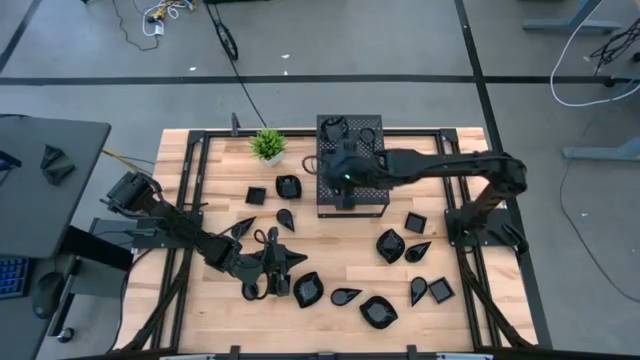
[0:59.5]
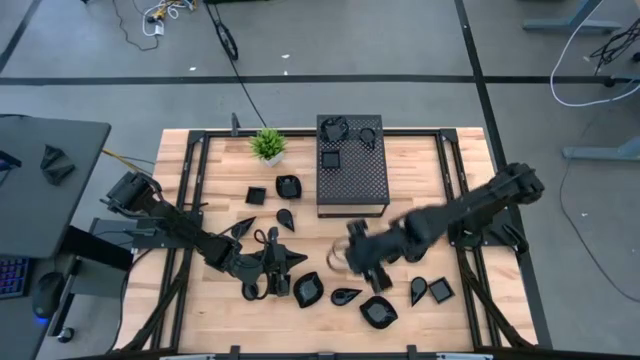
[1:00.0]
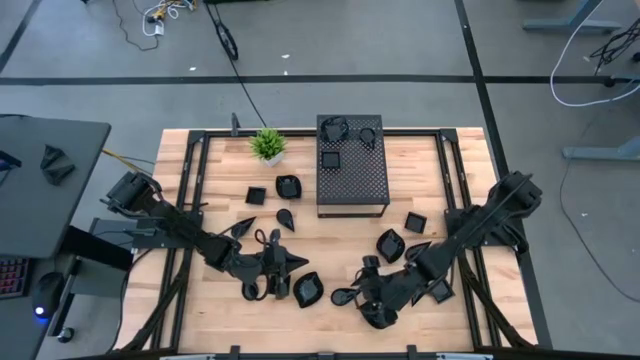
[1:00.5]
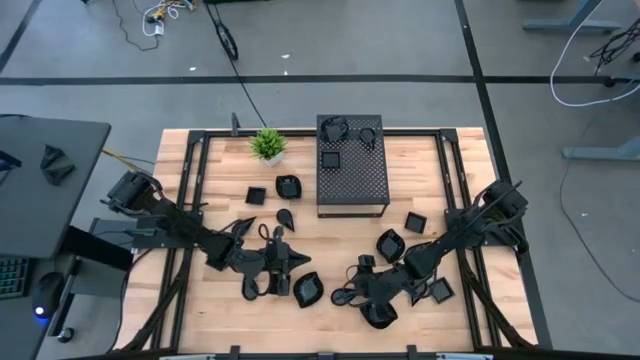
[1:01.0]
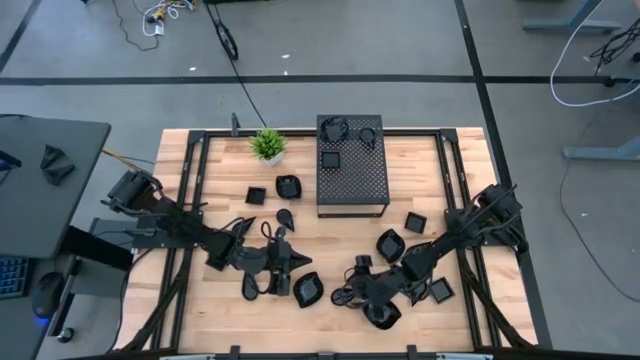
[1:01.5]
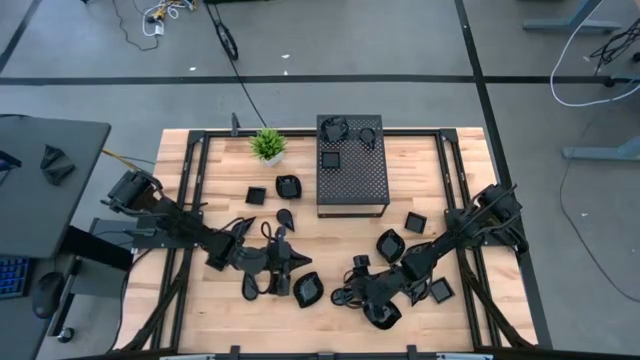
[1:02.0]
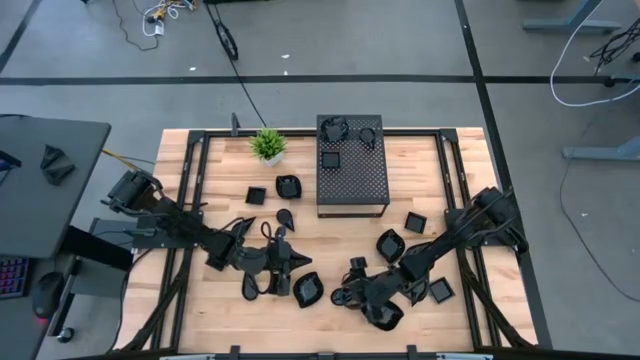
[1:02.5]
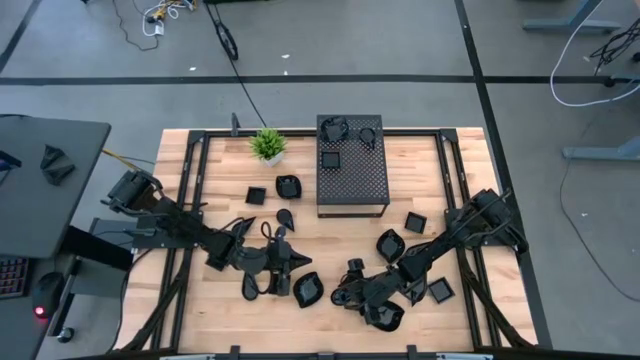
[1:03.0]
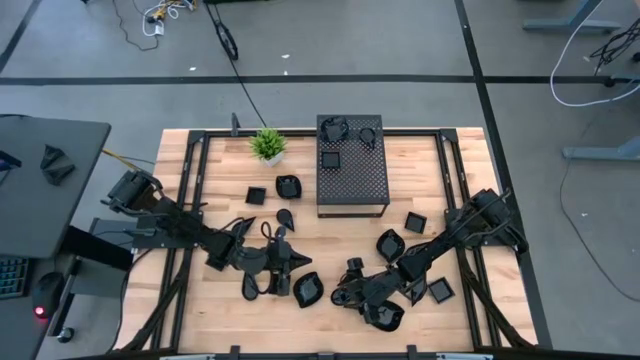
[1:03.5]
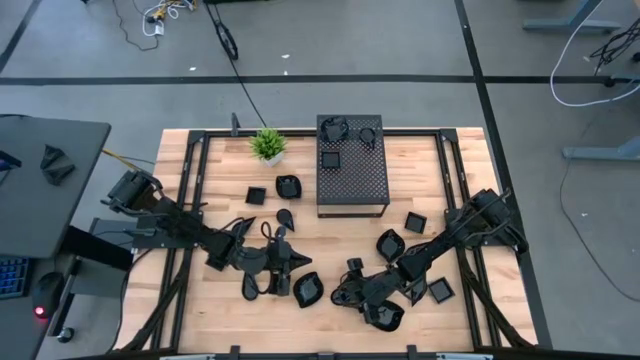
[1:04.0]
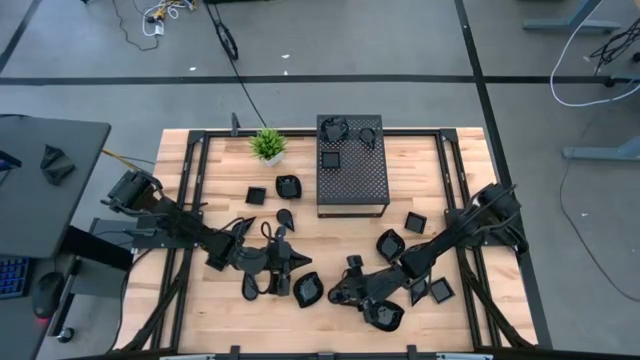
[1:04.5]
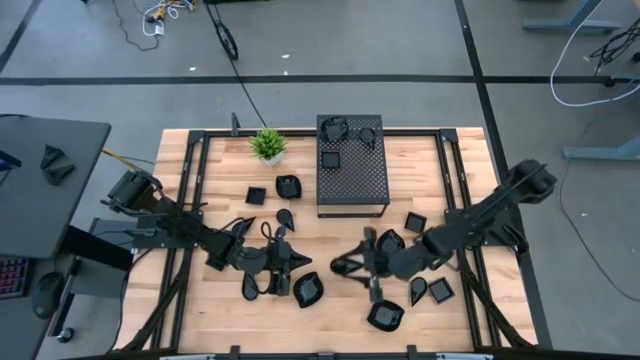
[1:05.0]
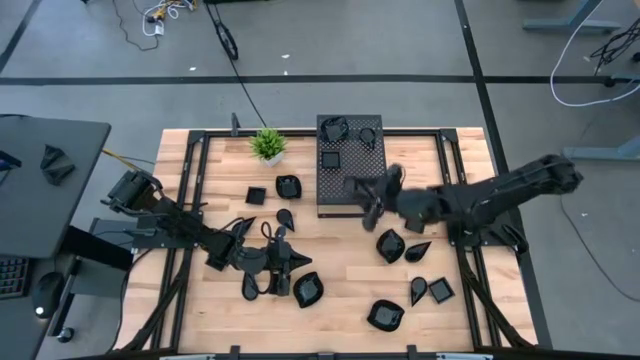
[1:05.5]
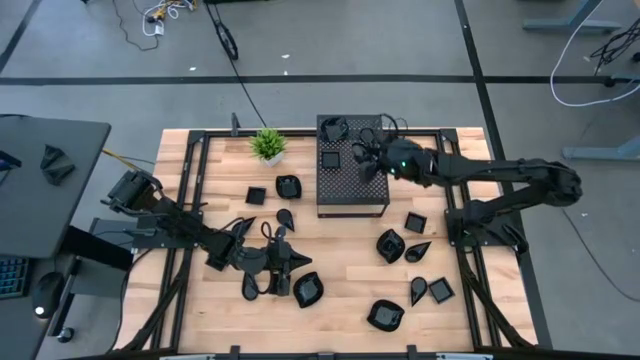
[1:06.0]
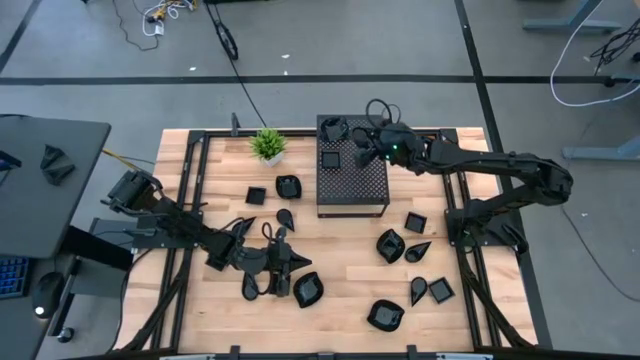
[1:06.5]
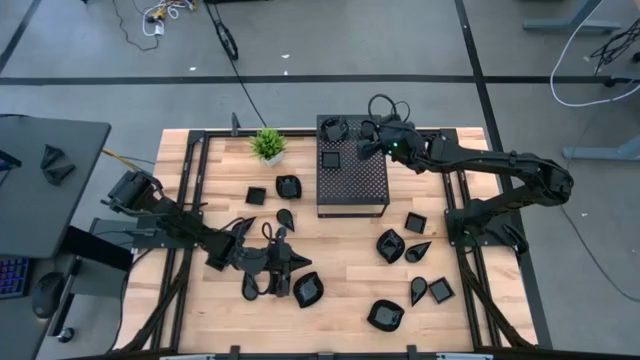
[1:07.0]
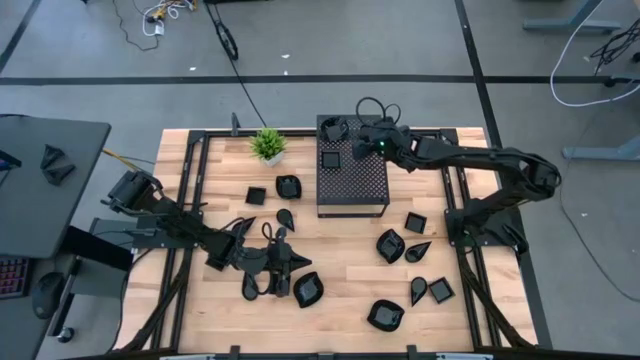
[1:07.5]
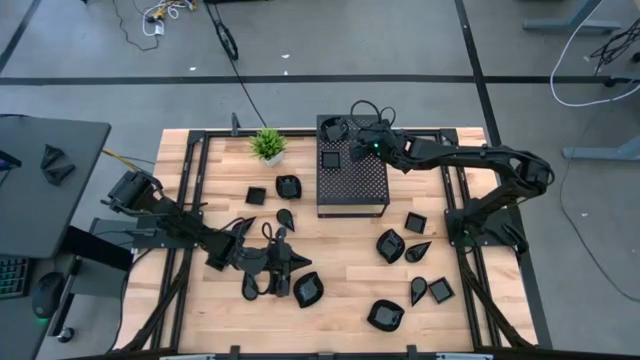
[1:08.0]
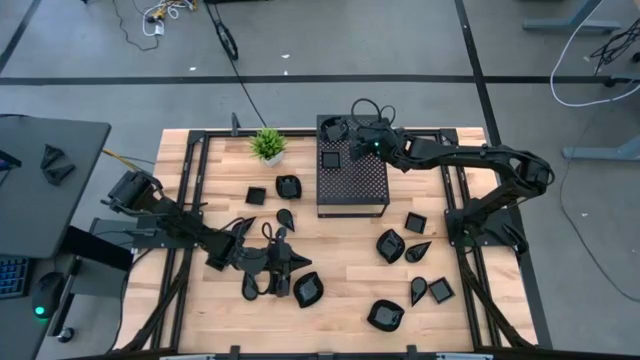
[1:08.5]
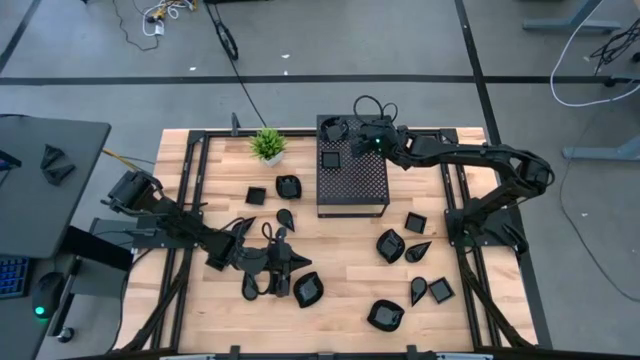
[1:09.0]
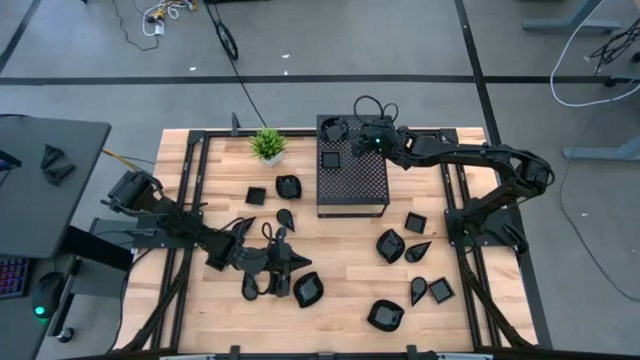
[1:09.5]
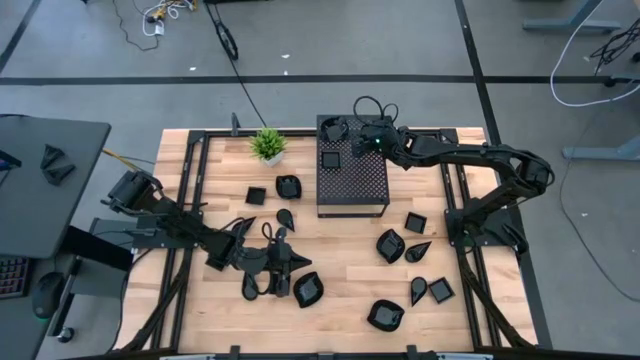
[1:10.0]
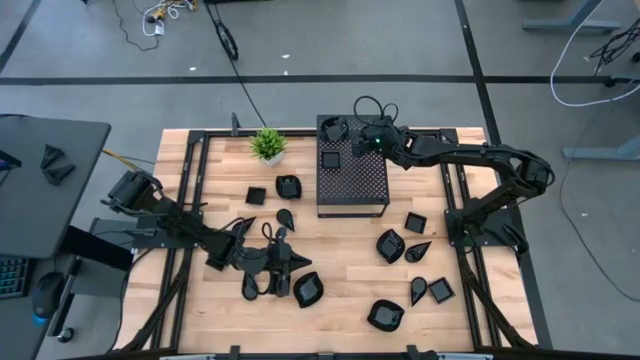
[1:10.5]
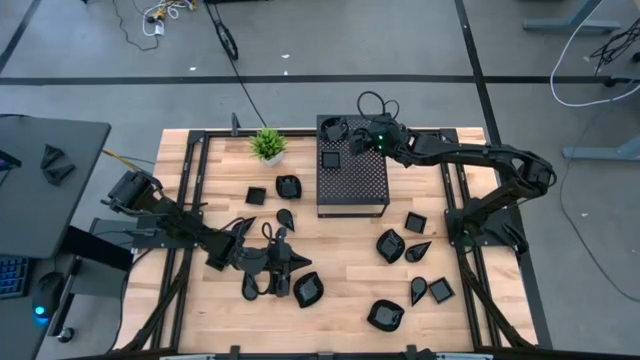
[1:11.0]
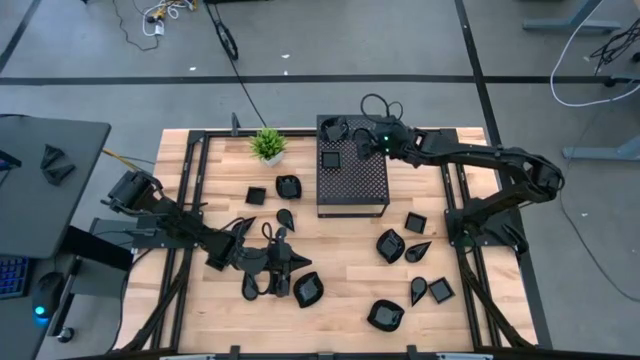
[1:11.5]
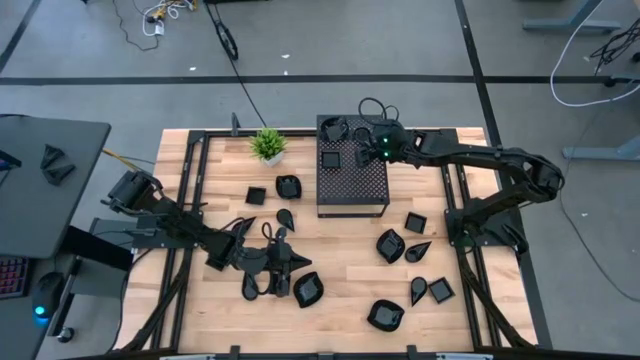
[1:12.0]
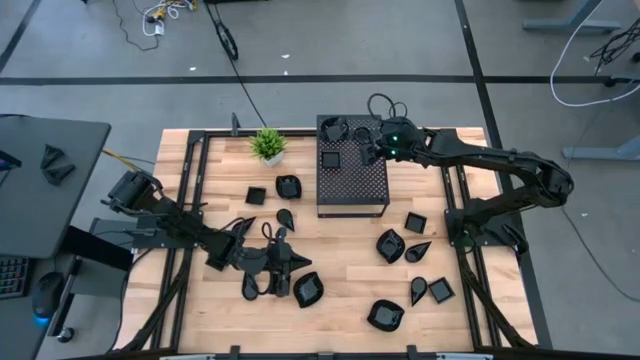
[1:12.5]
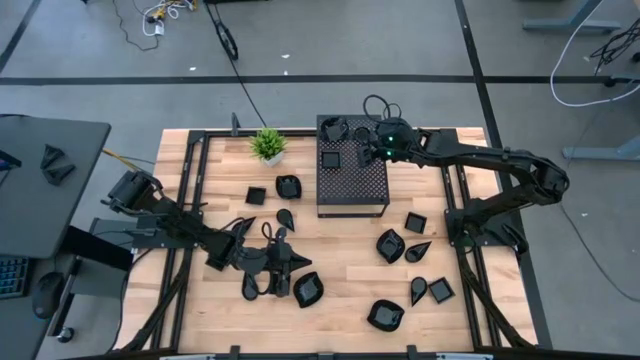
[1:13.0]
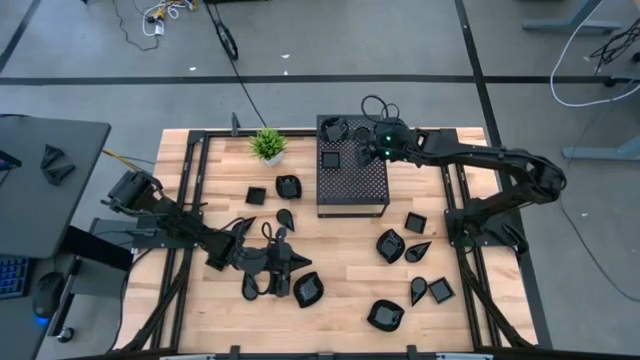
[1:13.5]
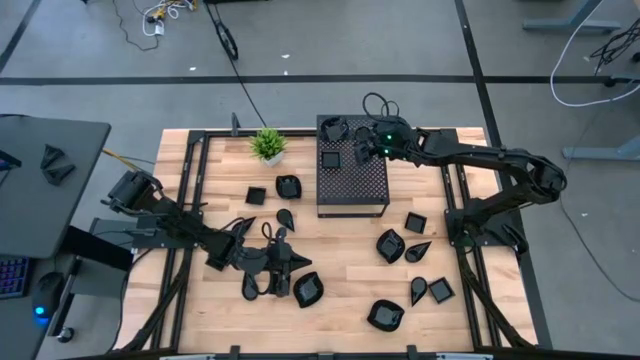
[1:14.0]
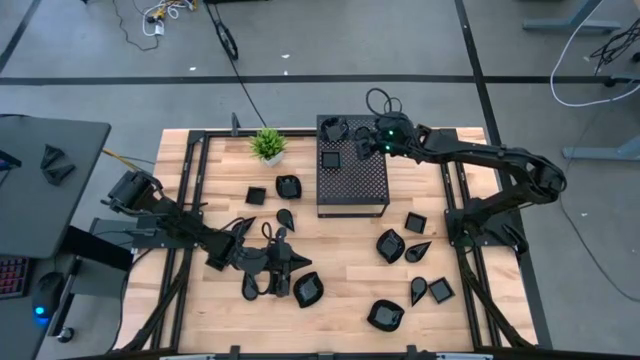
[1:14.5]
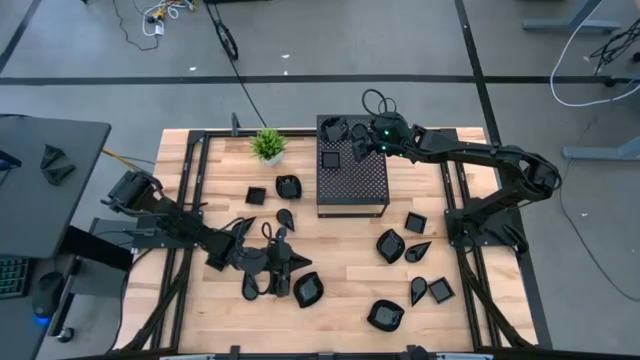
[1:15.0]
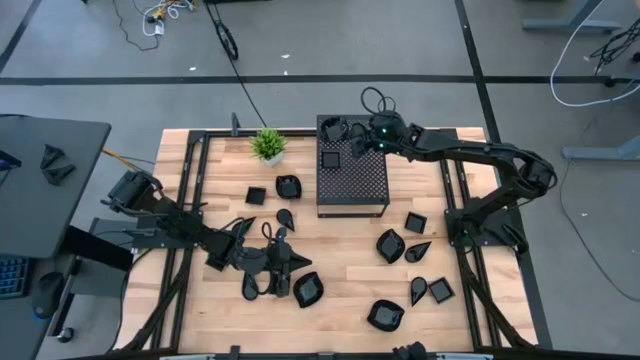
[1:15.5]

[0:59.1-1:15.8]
Task: Pick & Place Mini shaped plates
Stack the drop shaped plate on top of the drop shaped plate on the shelf

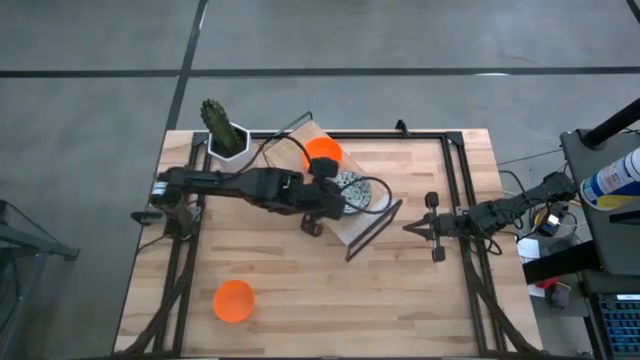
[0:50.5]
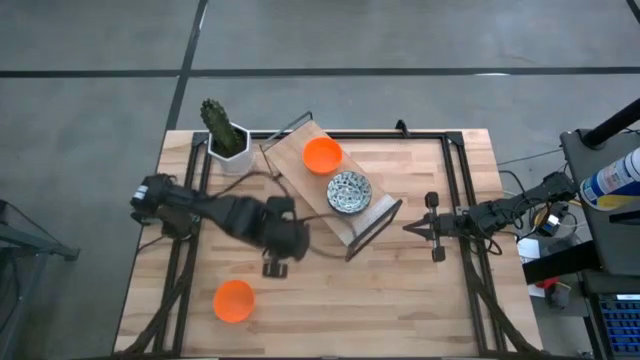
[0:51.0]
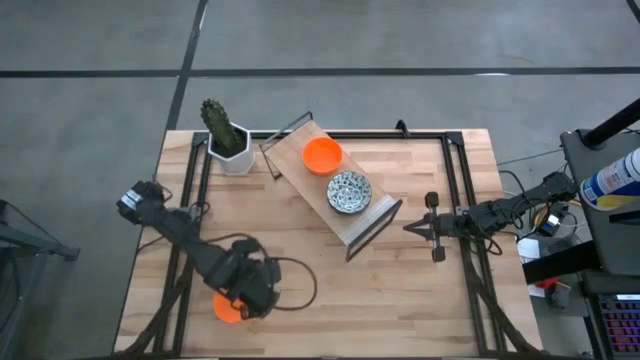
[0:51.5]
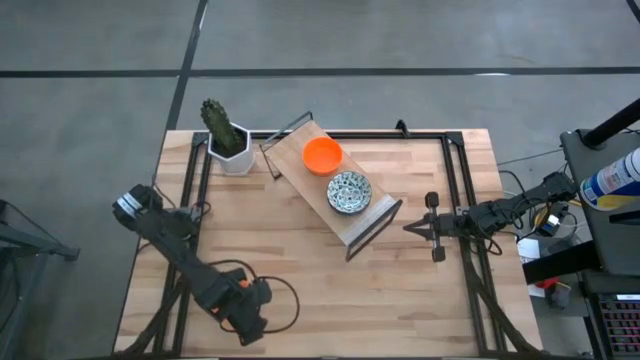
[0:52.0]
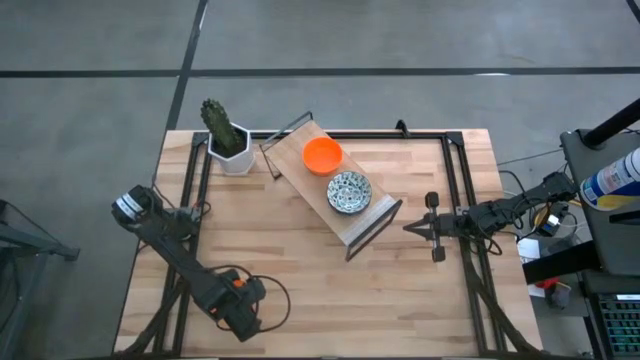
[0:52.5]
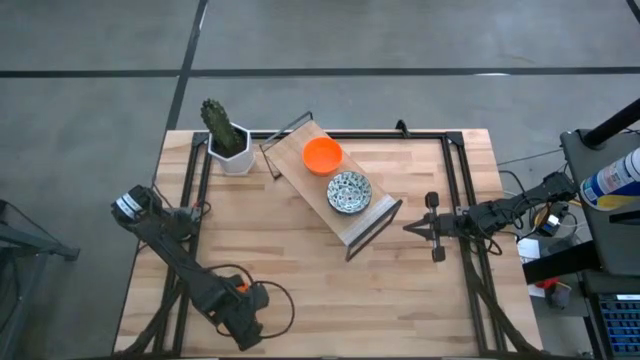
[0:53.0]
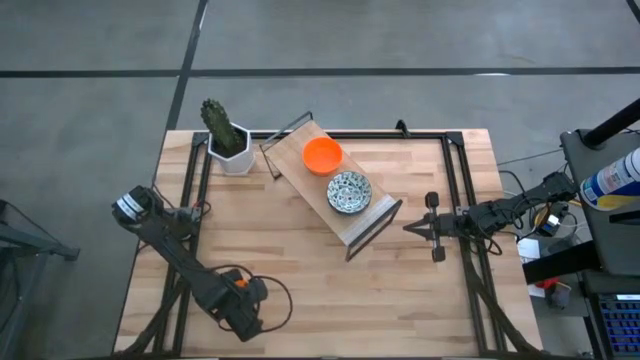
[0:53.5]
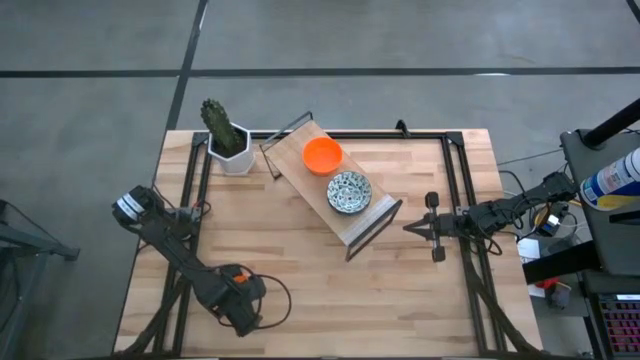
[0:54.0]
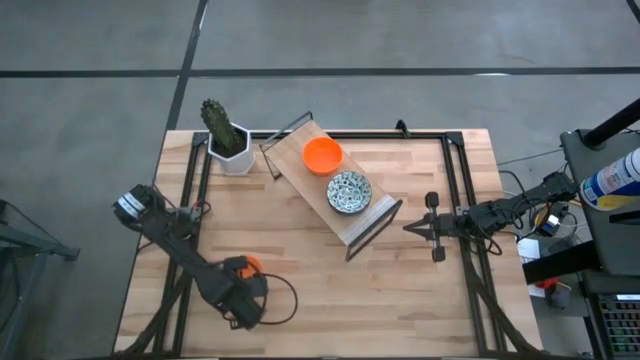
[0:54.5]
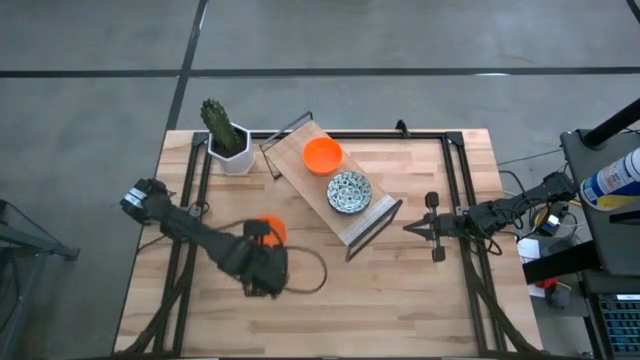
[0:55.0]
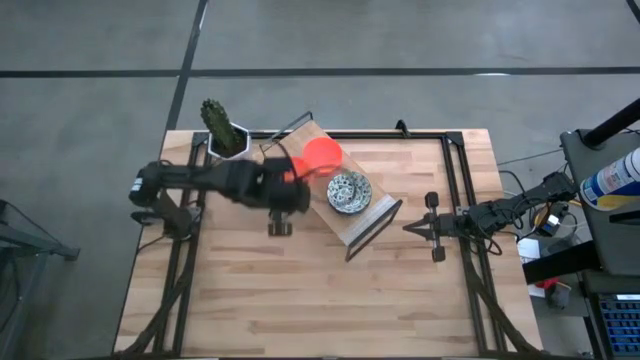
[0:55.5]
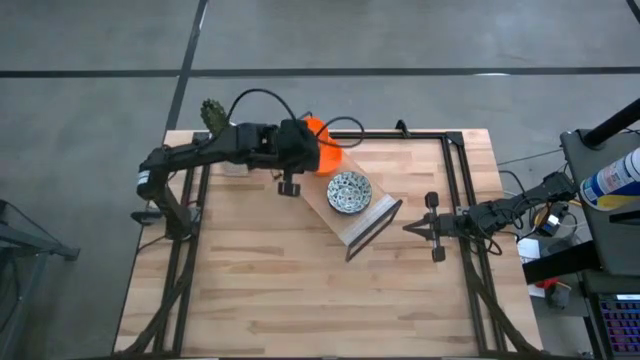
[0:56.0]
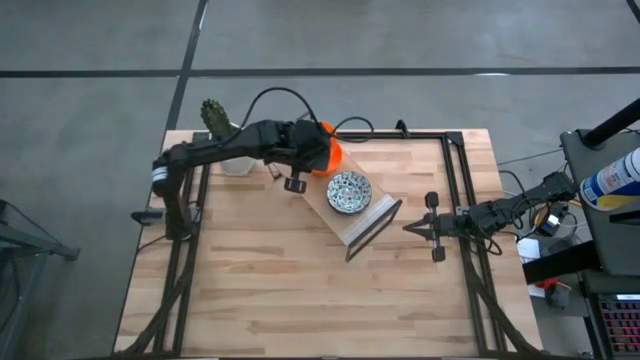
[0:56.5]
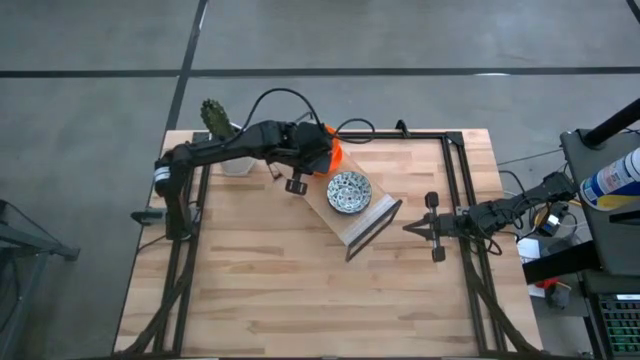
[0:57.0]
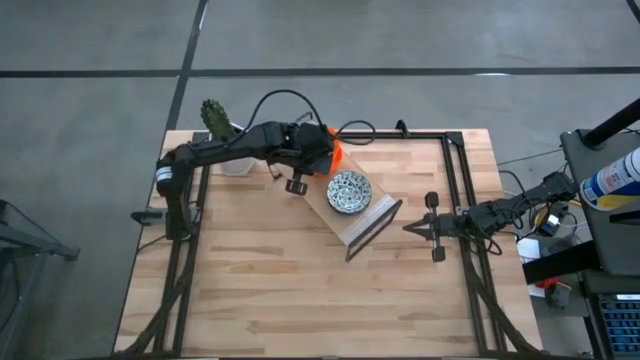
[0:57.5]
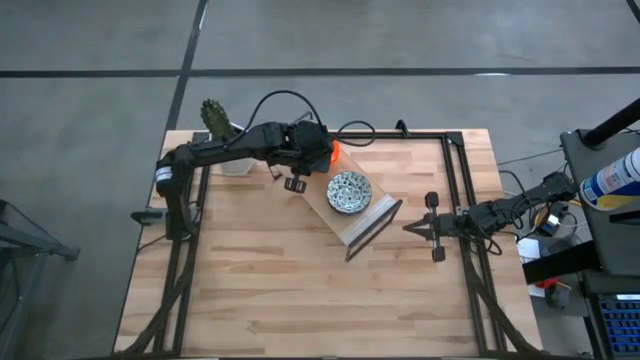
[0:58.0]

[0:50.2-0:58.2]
Task: Pick & Place Mini bowls
Stack the orange bowl on top of the orange bowl on the shelf
